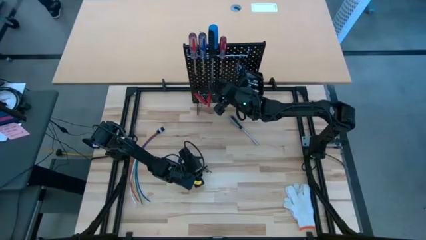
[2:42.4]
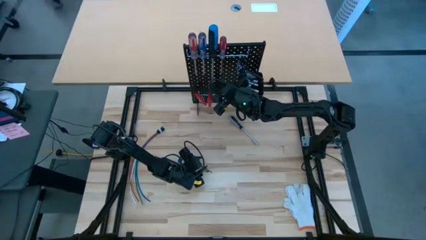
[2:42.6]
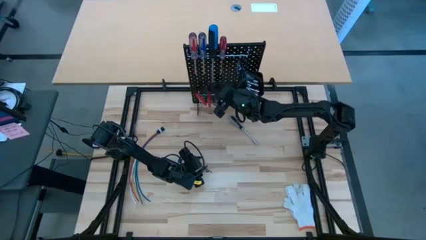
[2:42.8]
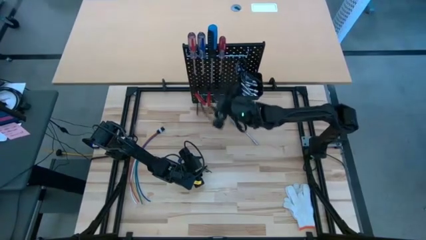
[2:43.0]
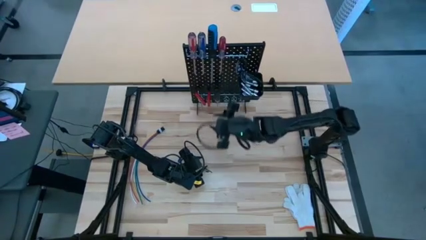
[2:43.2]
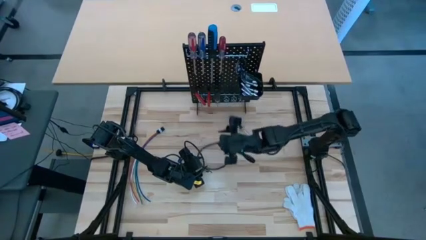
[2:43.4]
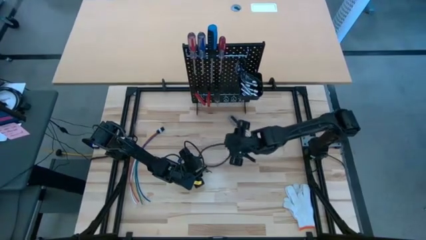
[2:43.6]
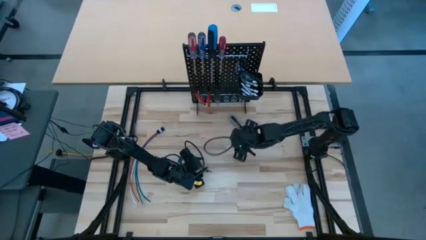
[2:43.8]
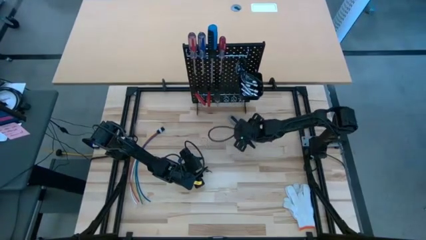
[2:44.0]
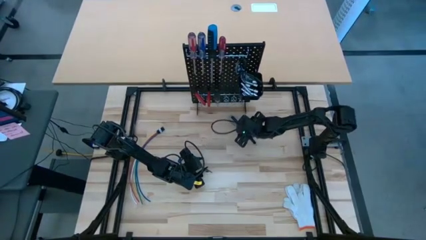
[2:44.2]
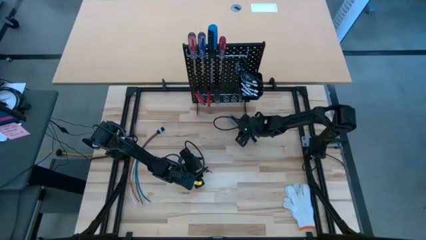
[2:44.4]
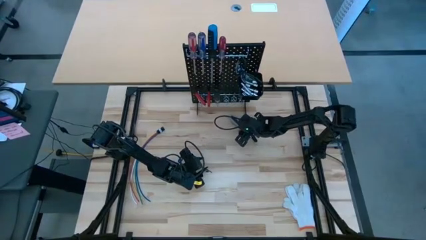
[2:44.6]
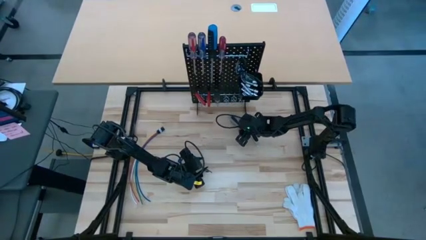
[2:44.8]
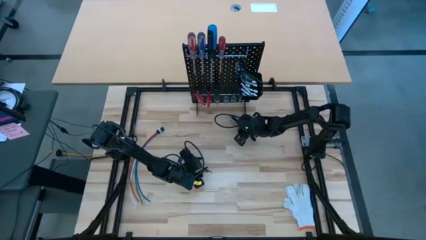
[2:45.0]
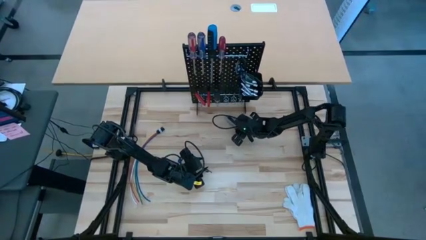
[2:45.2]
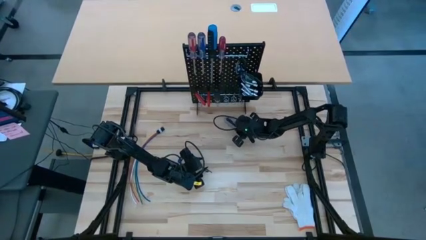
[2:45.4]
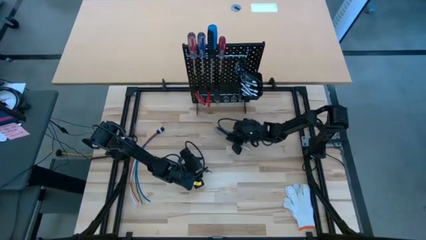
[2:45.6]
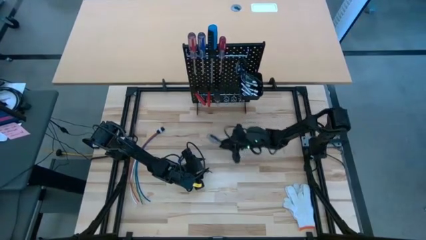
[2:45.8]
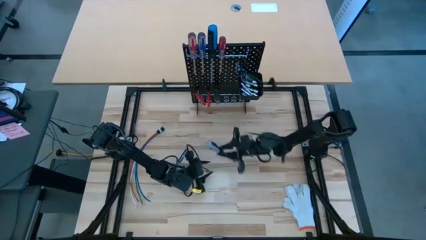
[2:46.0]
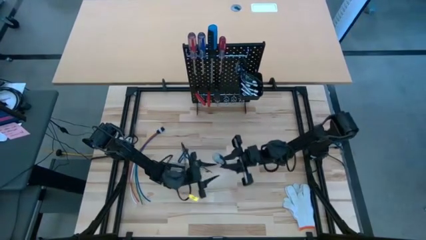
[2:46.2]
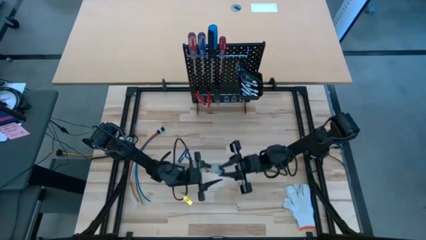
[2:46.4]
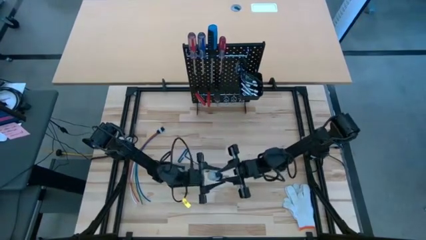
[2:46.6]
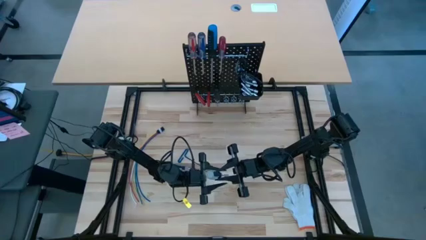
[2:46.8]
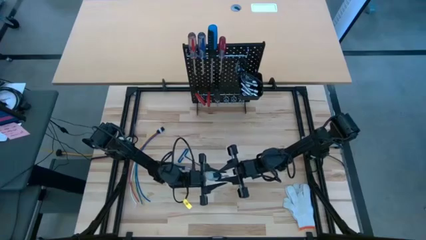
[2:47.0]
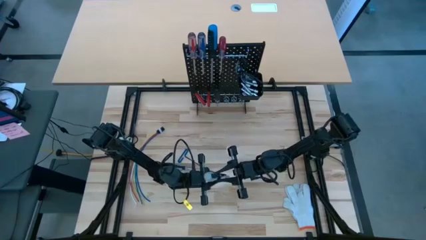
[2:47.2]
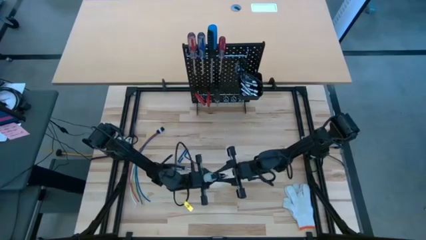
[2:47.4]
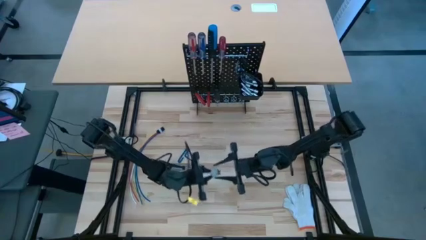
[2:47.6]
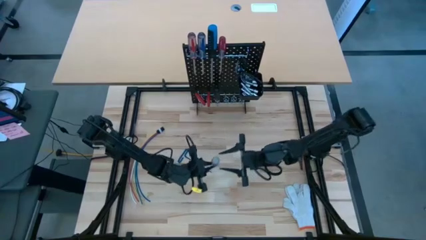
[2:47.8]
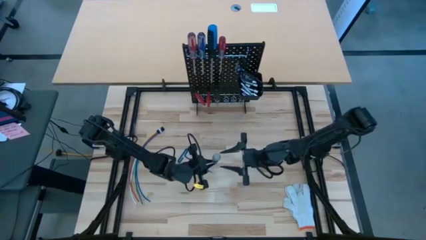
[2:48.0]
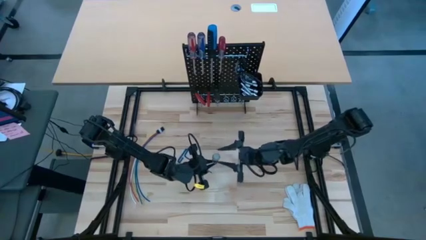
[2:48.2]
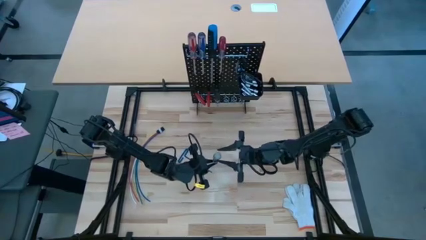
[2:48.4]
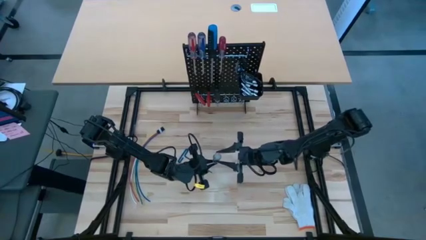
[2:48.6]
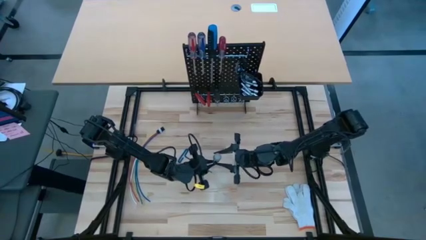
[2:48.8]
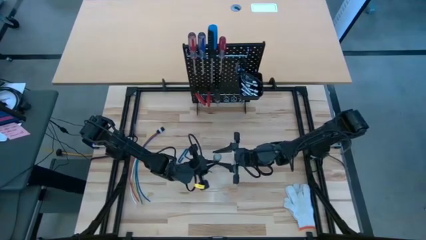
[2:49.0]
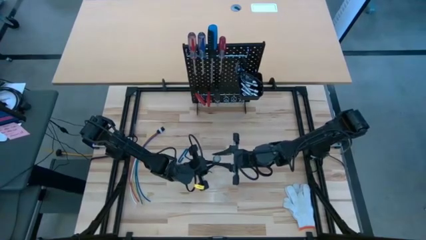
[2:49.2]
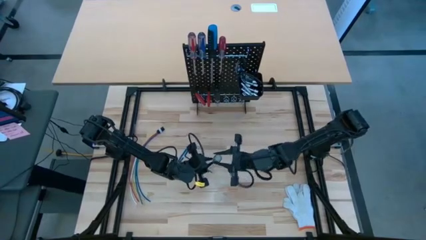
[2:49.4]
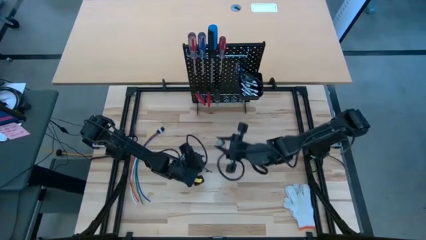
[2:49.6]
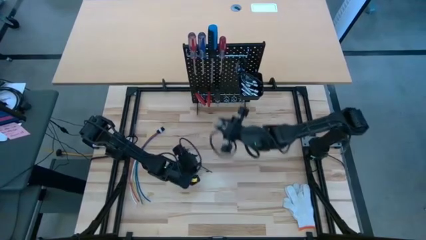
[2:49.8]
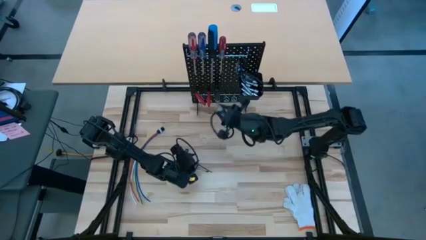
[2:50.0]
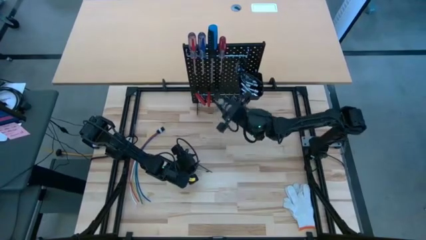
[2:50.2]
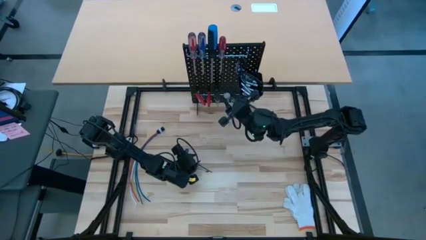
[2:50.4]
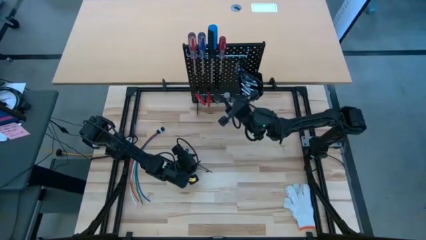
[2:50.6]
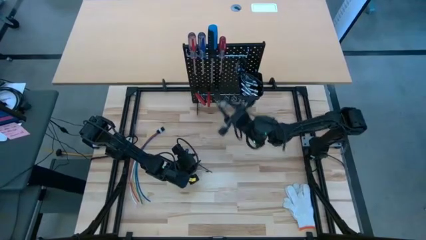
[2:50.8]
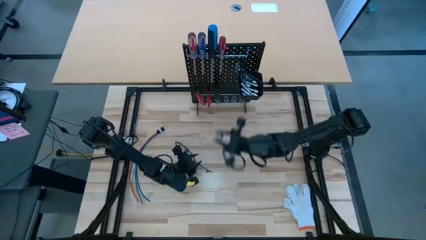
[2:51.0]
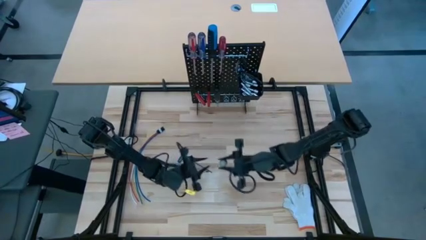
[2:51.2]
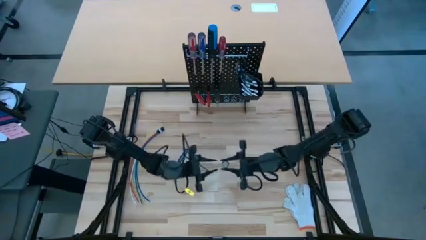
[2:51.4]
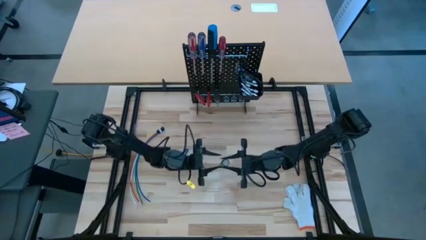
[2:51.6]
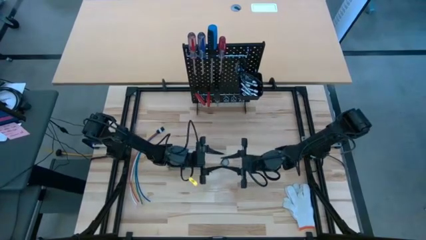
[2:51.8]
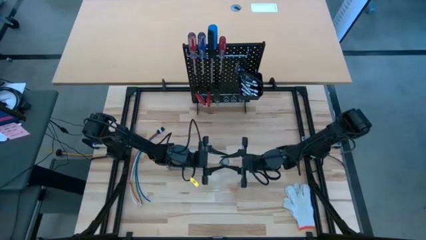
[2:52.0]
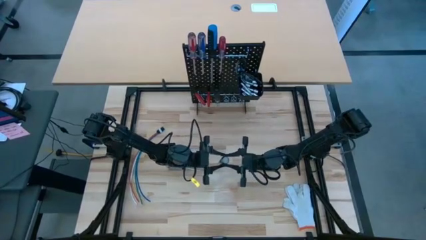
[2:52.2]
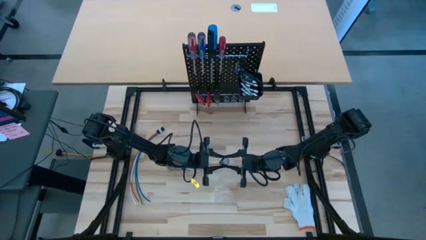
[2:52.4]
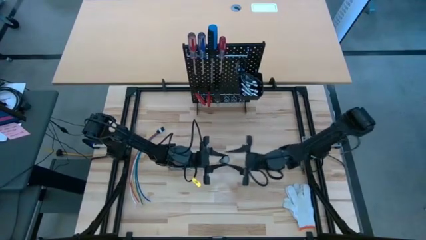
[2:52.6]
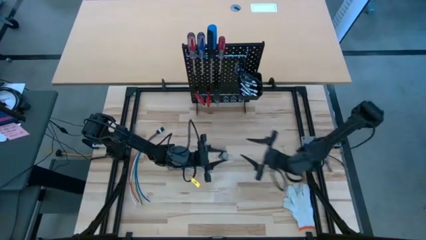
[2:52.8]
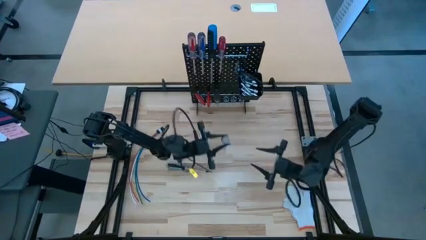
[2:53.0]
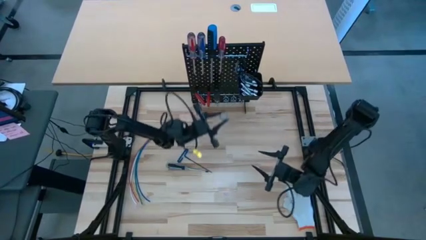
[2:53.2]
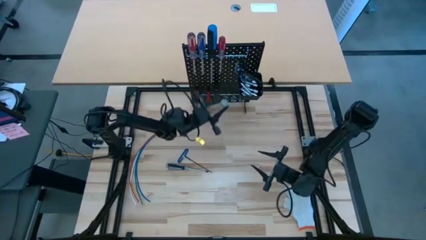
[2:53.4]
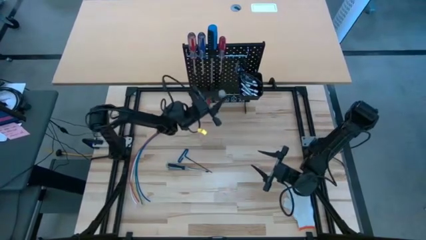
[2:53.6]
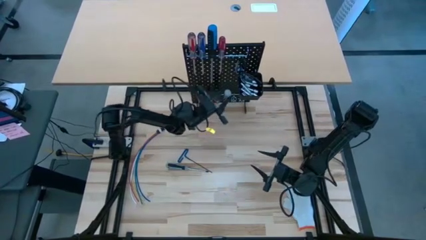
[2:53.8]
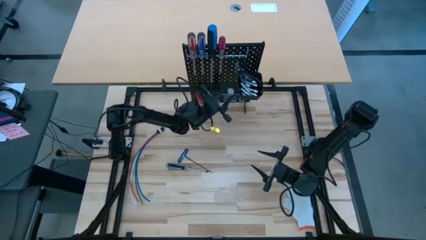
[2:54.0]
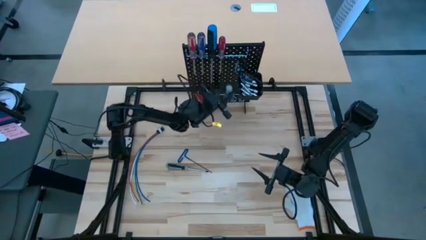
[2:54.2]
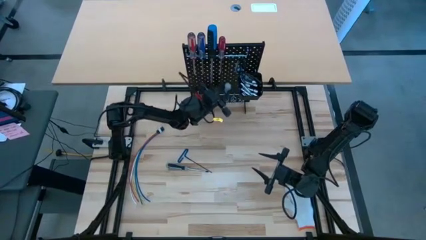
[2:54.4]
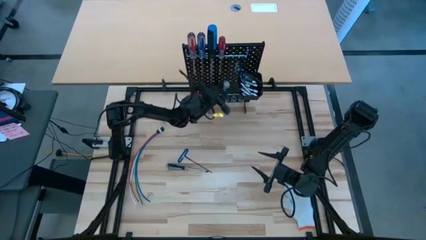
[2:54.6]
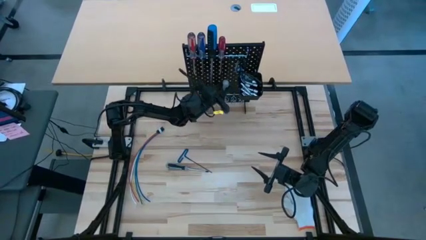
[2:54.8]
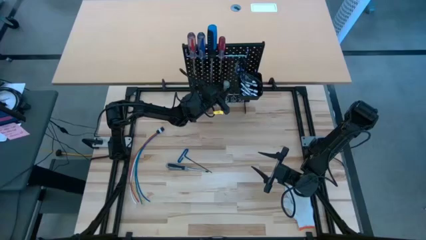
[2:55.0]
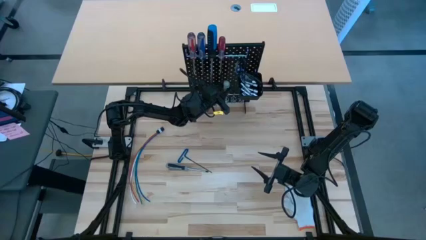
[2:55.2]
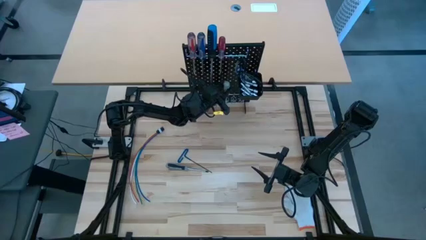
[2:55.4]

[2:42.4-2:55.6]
Task: Hang tools onto peg board
Hang the gray screwdriver on the pegboard

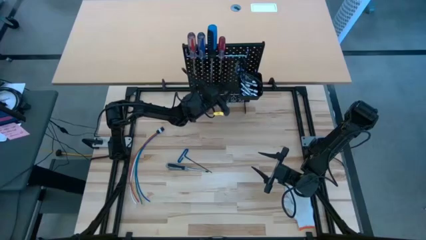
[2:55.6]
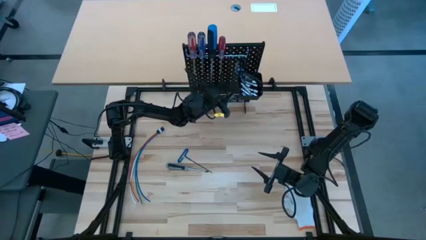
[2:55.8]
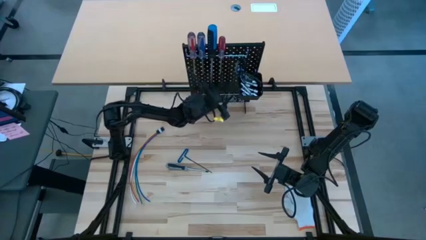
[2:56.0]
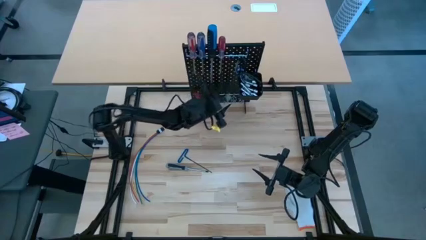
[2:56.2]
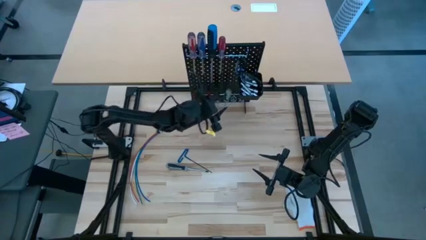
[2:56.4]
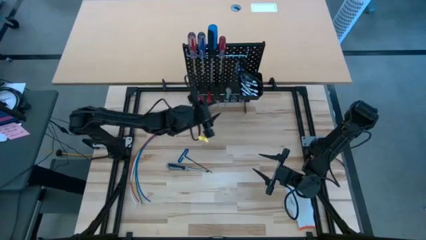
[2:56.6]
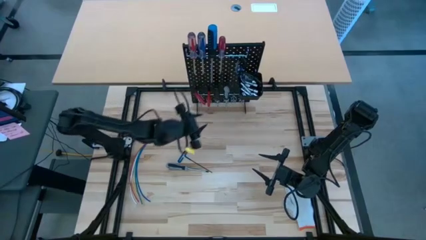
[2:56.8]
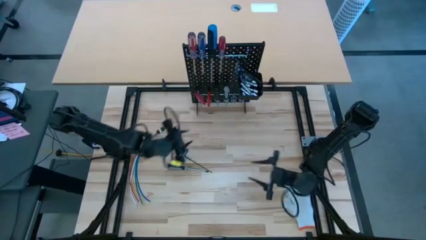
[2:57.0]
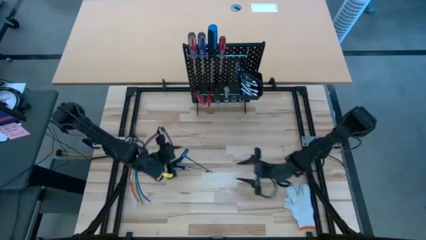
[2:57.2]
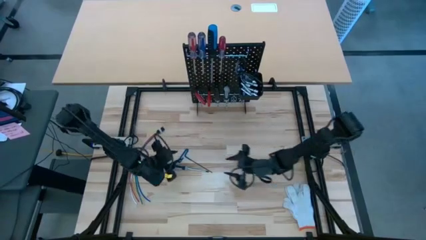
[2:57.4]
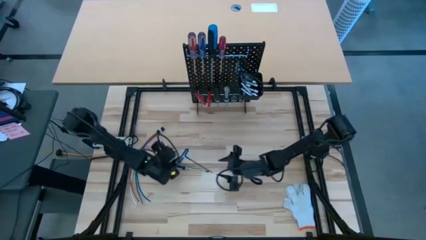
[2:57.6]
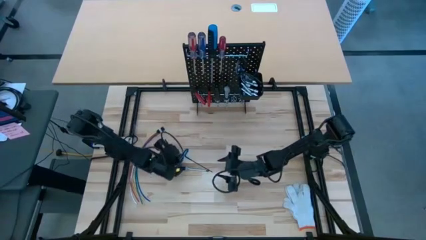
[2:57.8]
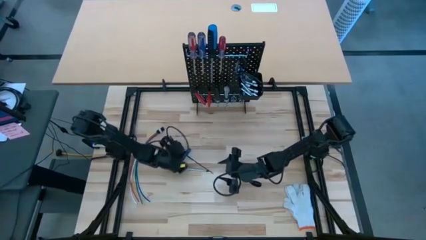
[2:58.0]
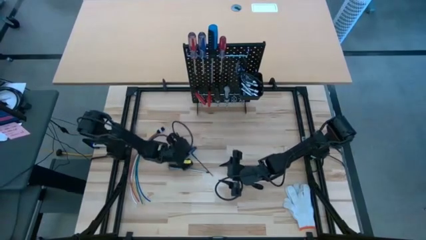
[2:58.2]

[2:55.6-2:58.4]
Hang the pick tool on the pegboard
